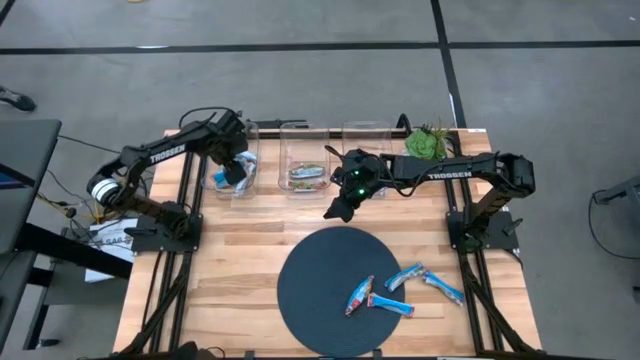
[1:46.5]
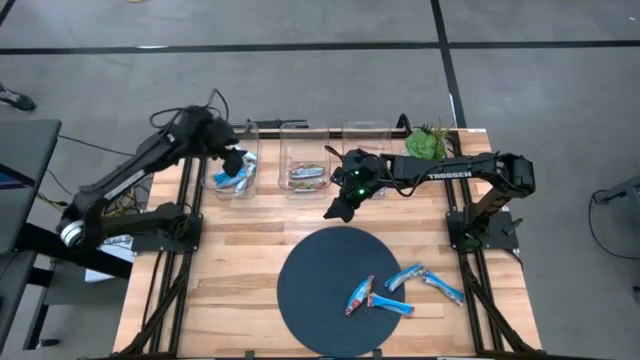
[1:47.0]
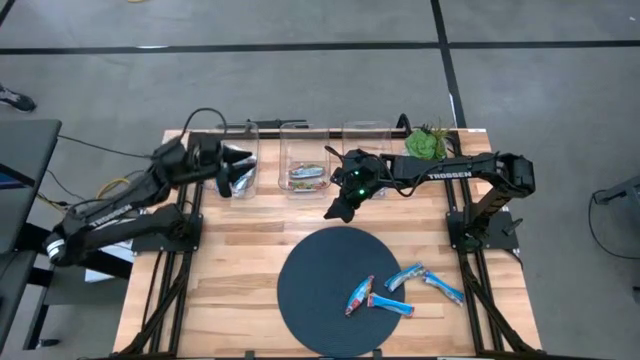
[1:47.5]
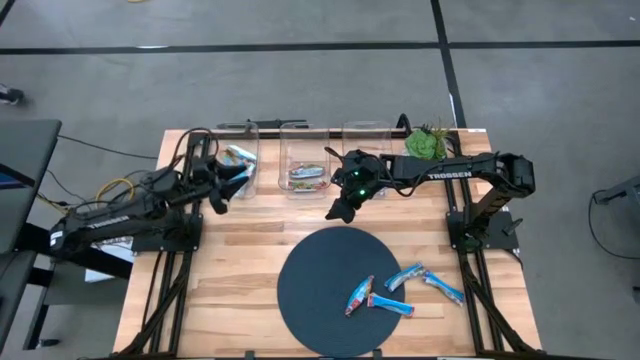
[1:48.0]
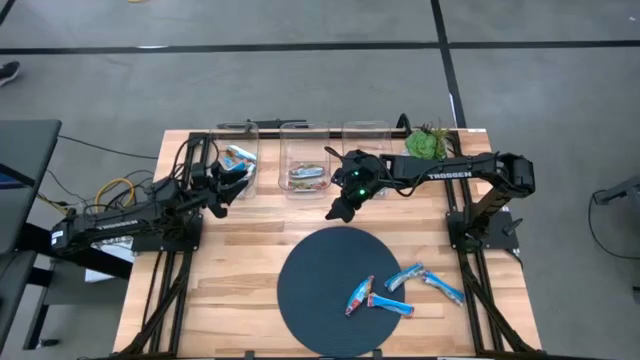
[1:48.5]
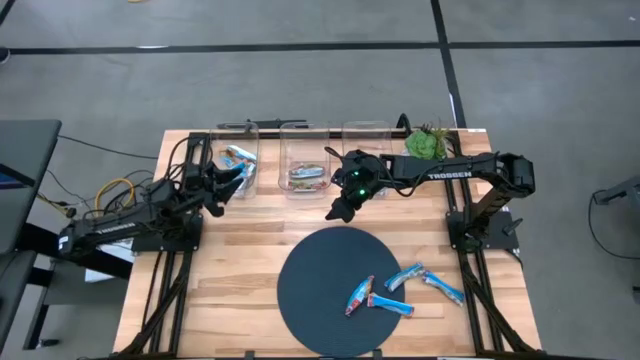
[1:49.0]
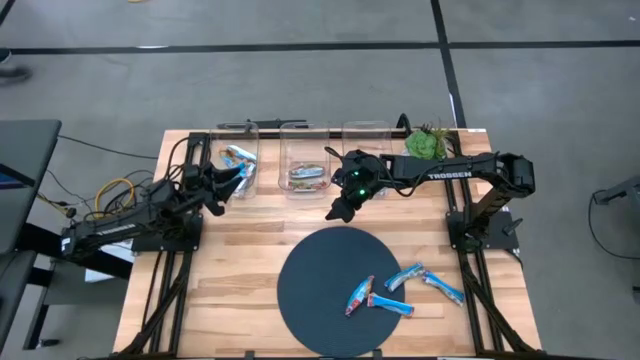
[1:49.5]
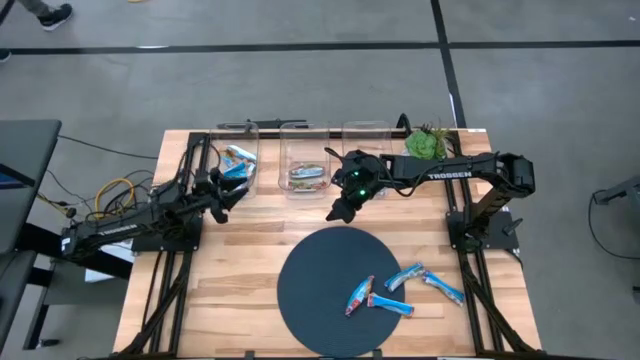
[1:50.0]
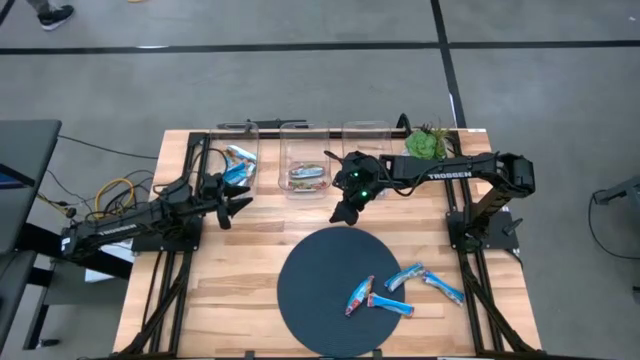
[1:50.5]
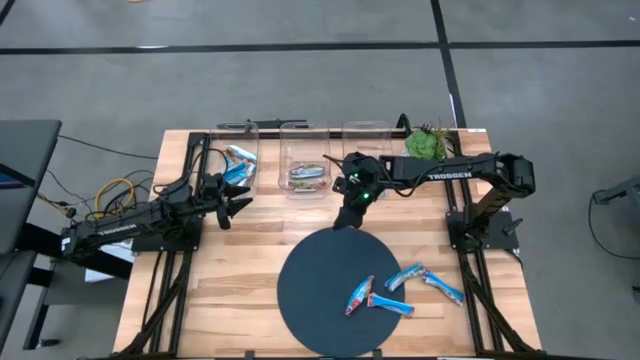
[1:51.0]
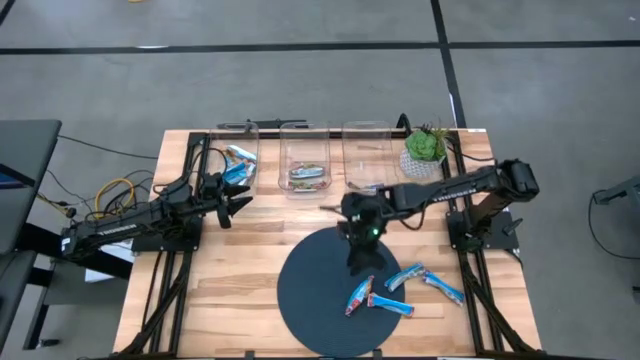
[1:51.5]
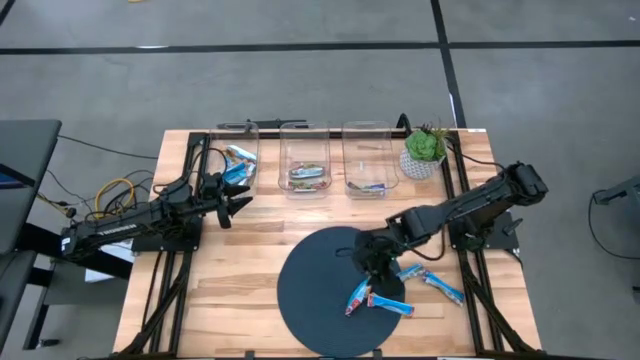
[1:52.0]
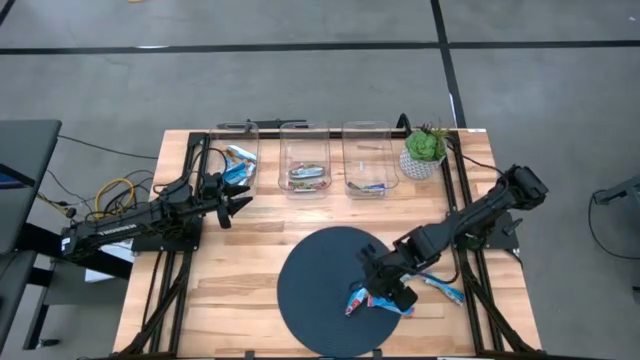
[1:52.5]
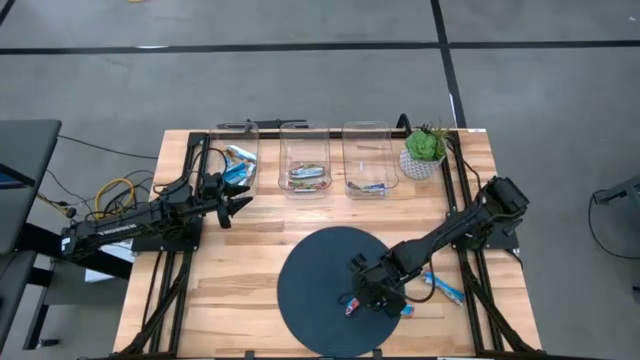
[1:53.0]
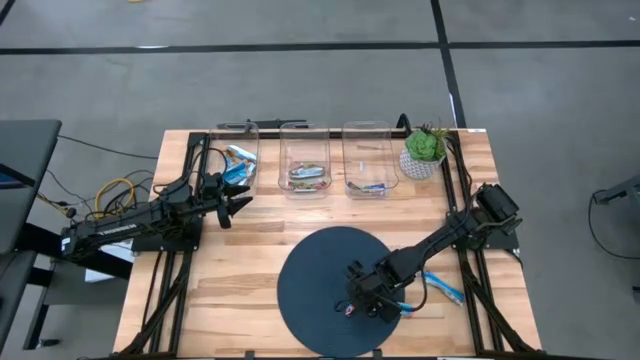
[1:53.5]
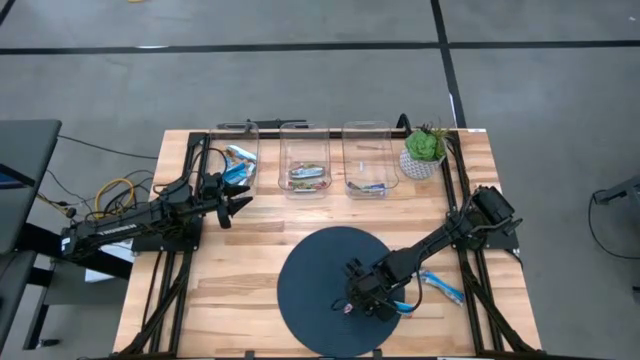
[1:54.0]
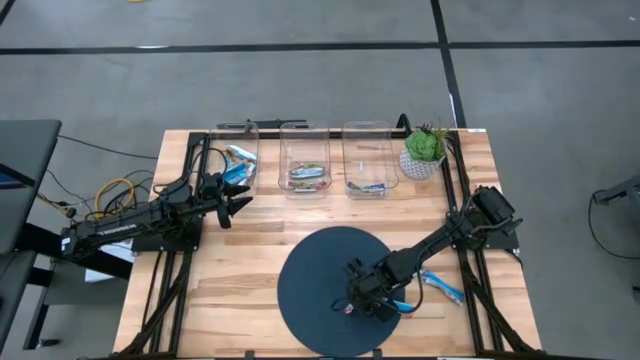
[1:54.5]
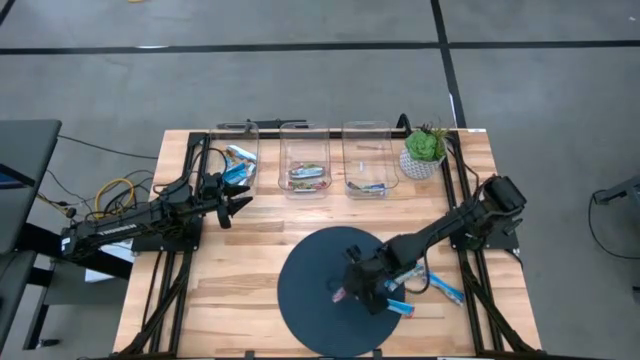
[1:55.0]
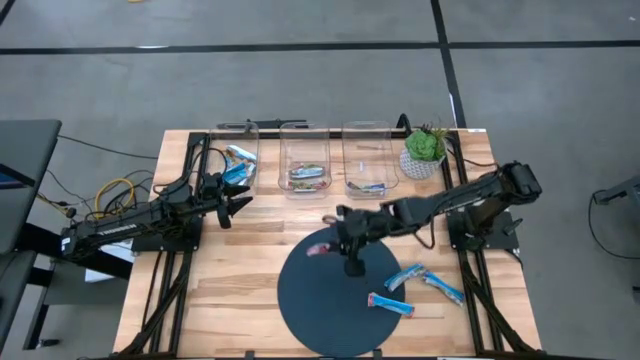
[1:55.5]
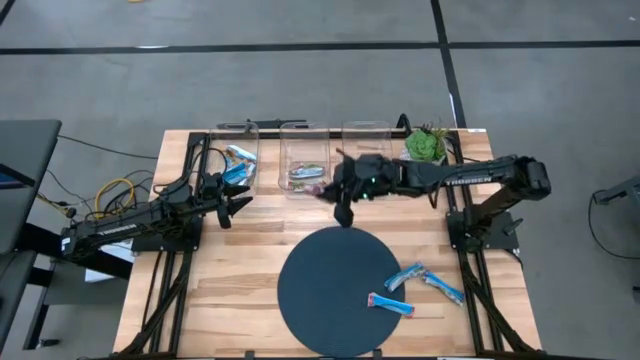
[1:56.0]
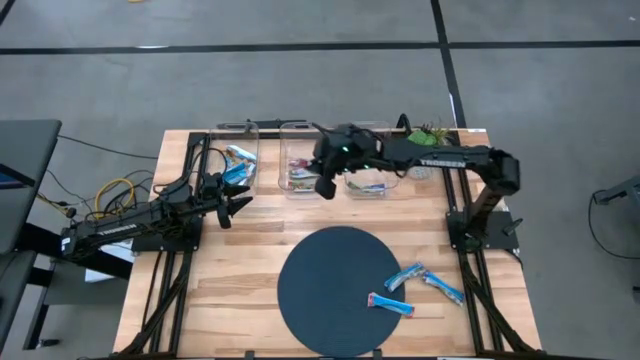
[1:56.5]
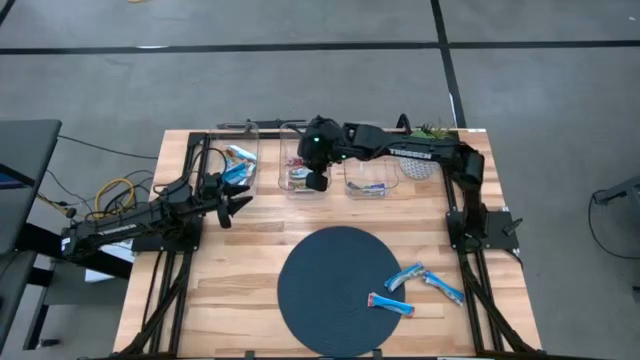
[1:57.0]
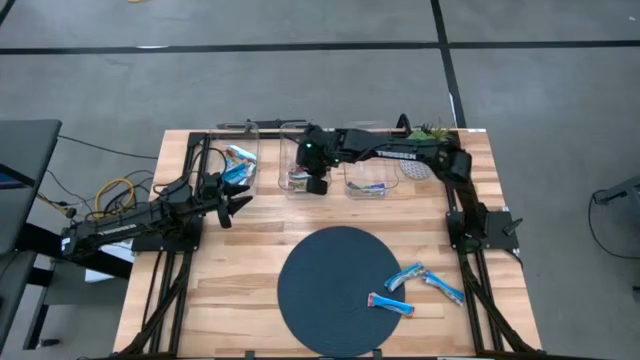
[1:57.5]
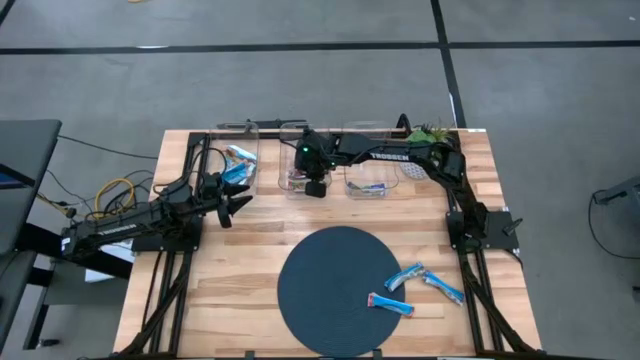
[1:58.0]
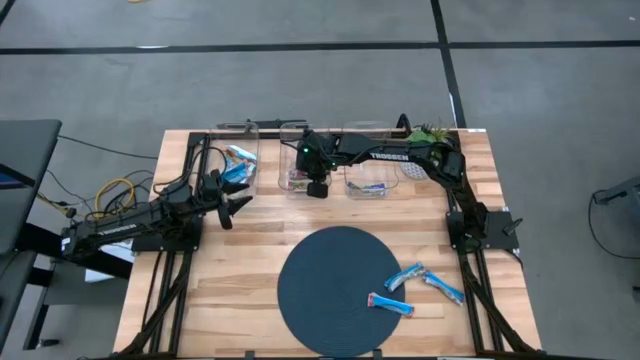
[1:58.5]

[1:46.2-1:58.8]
Task: Pick and place Granola Bars by type
Put the red granola bar into the middle transparent bin

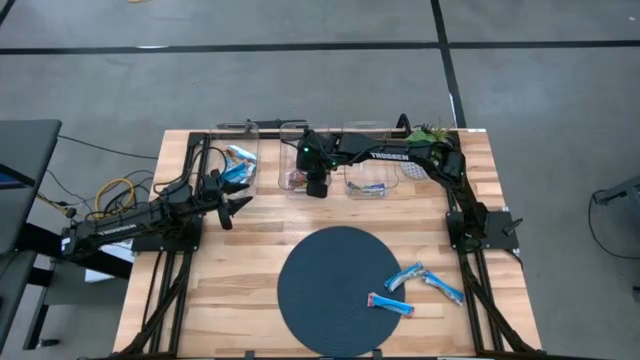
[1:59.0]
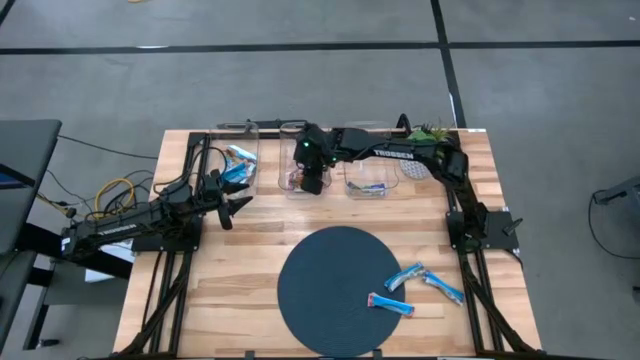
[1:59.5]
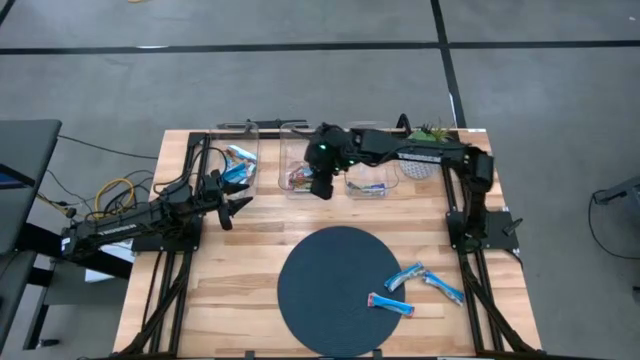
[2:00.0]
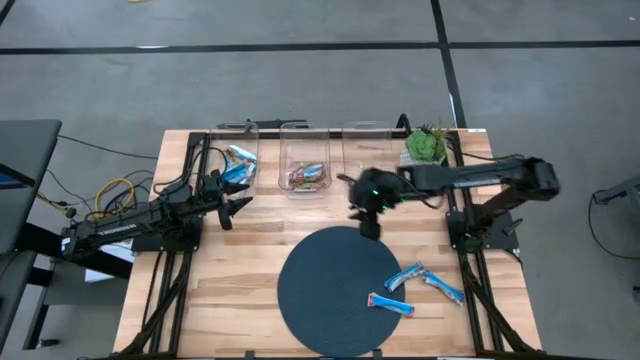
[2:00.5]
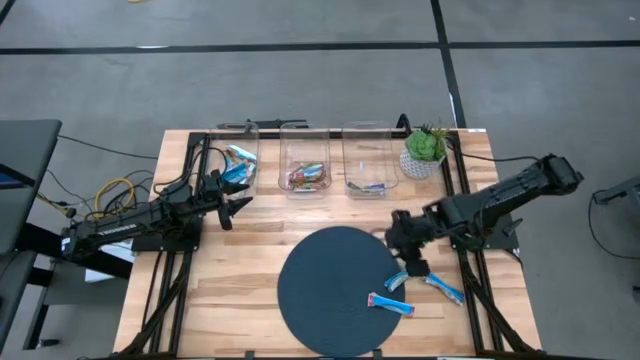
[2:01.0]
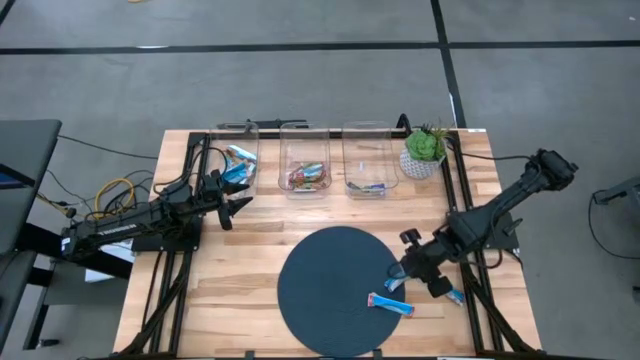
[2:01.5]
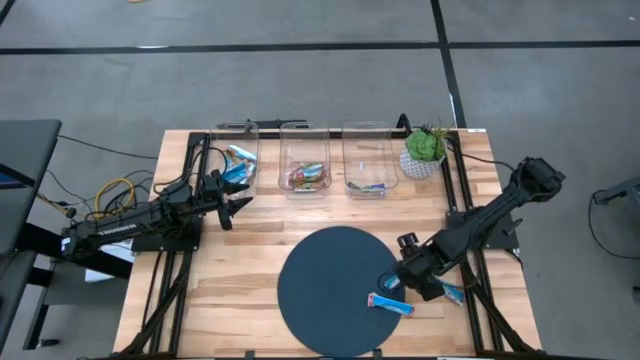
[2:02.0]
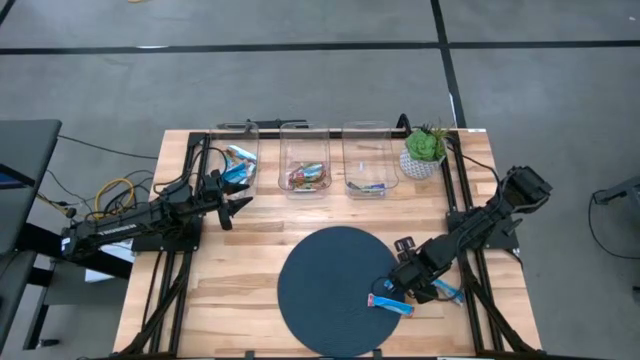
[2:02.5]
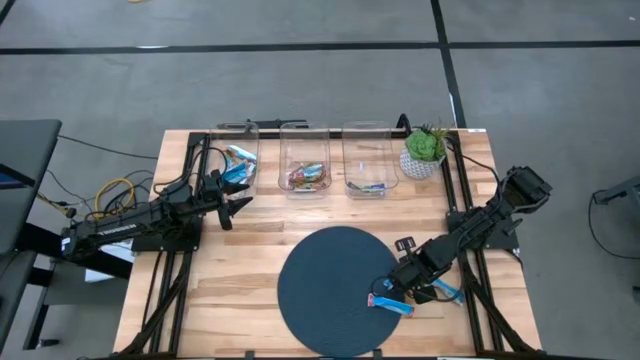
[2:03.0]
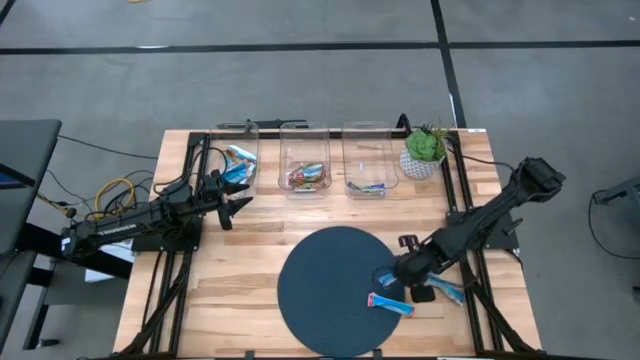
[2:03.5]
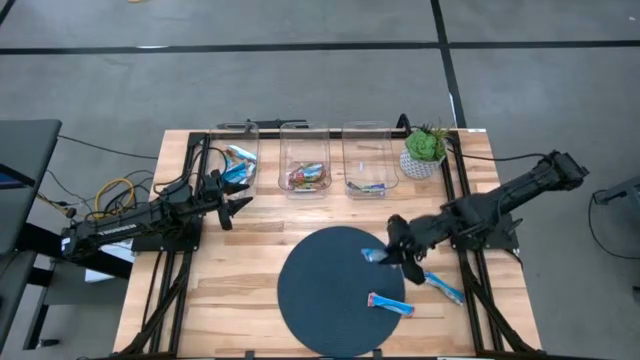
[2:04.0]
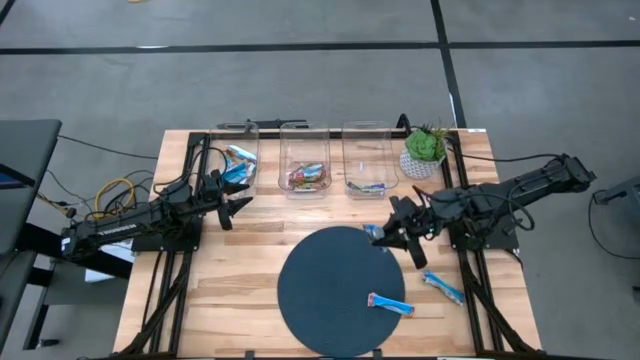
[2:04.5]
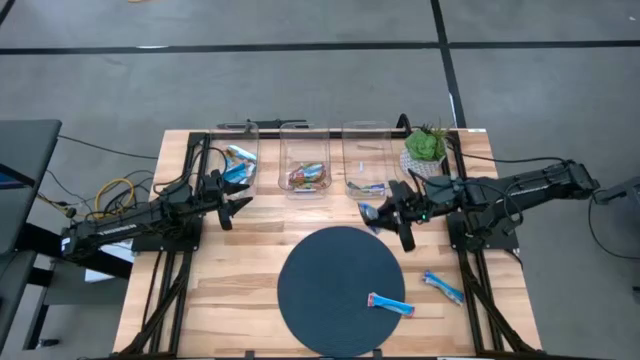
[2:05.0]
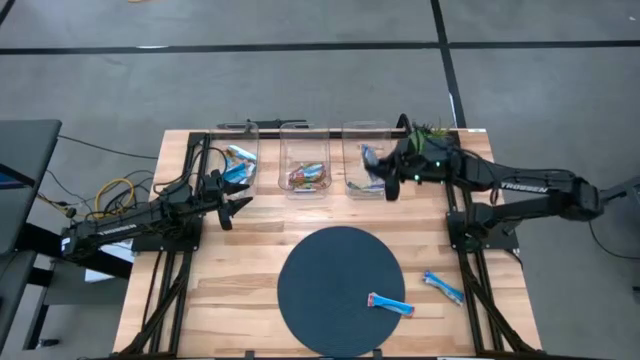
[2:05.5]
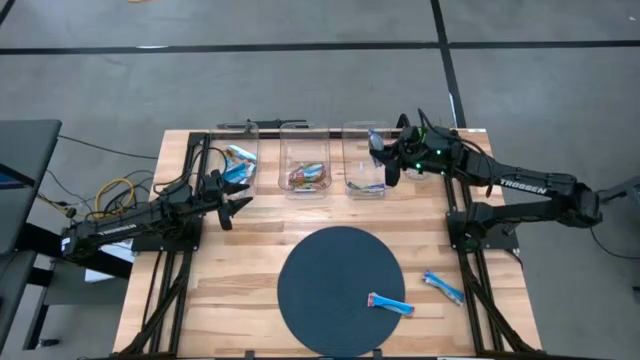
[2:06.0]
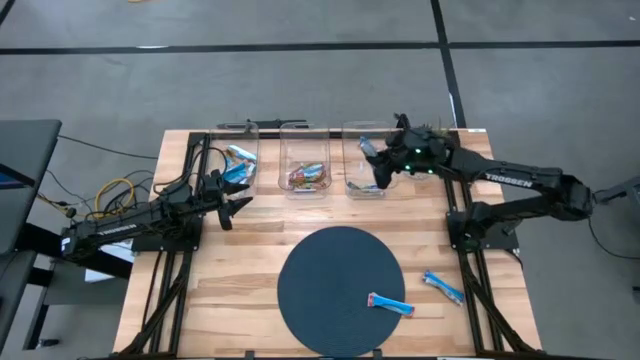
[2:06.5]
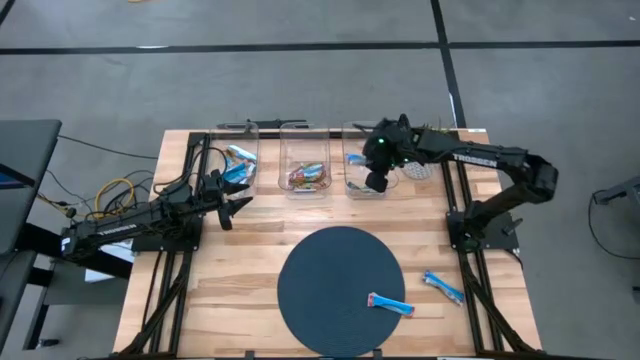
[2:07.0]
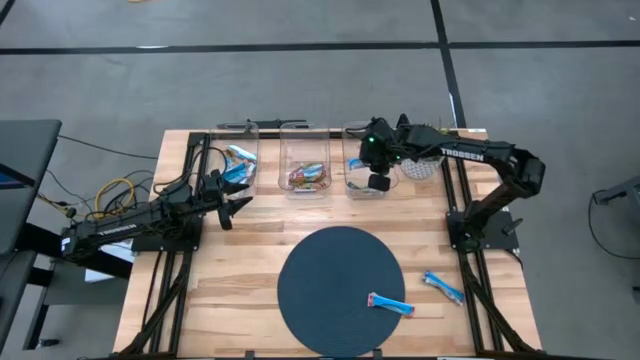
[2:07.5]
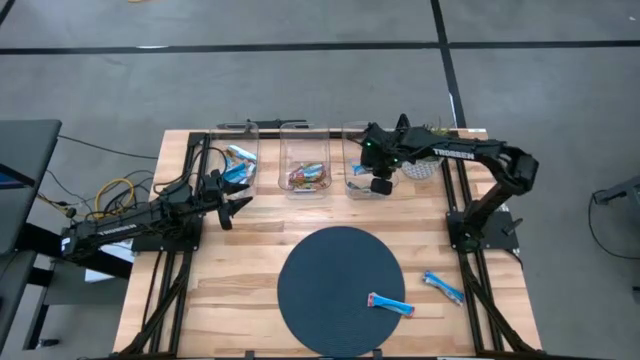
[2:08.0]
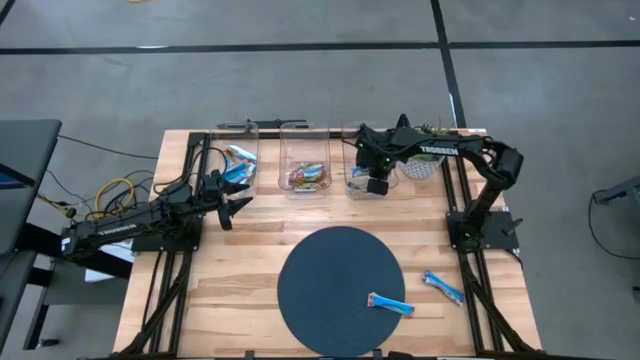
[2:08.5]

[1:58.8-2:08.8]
Put the blue granola bar into the right transparent bin
